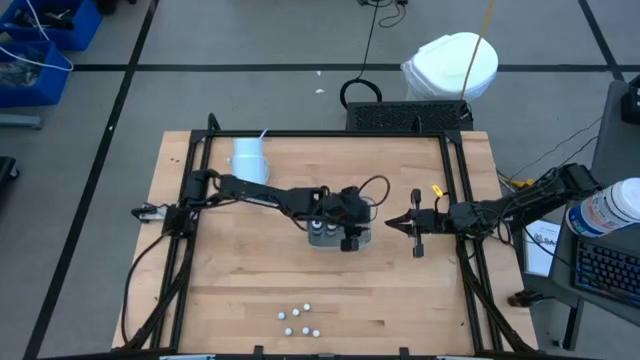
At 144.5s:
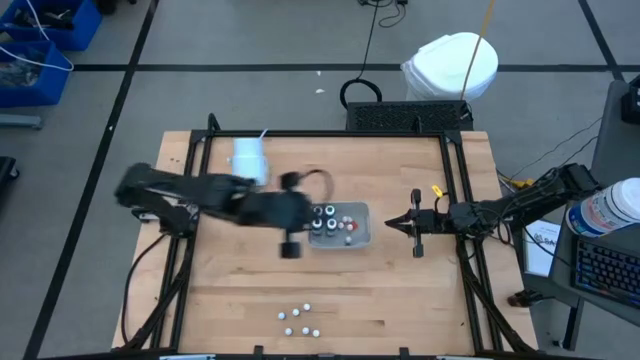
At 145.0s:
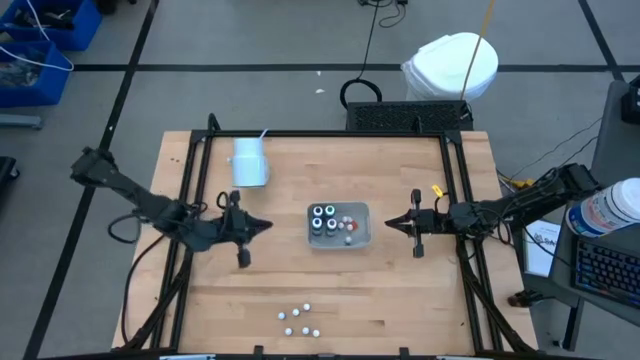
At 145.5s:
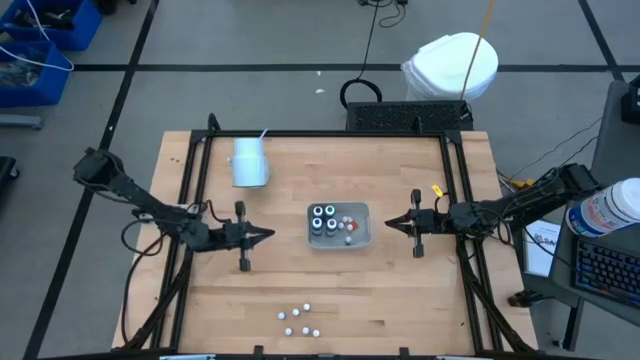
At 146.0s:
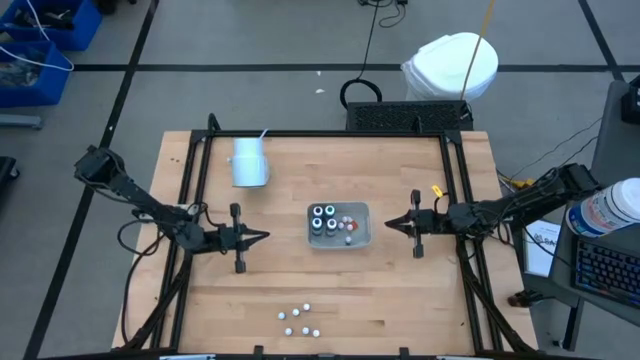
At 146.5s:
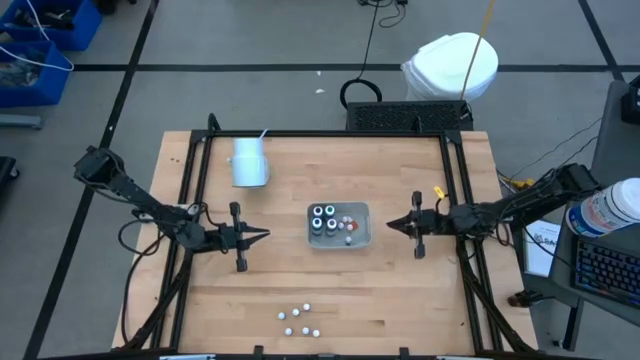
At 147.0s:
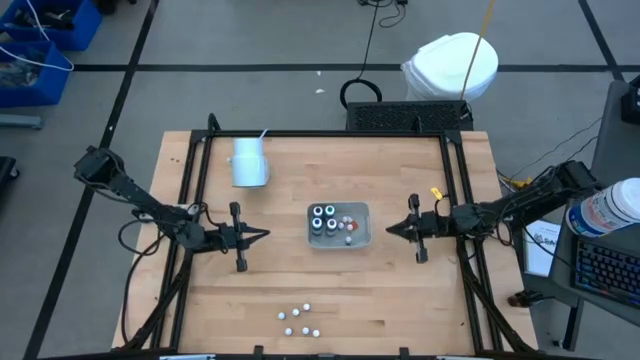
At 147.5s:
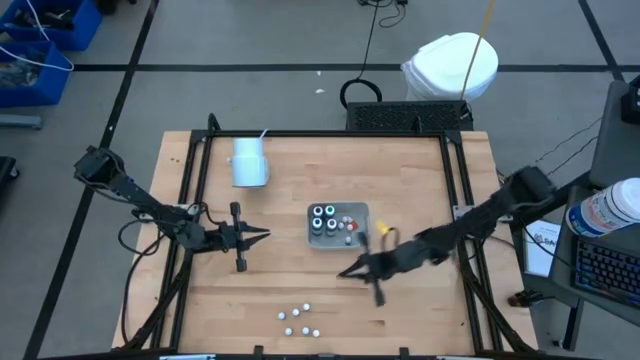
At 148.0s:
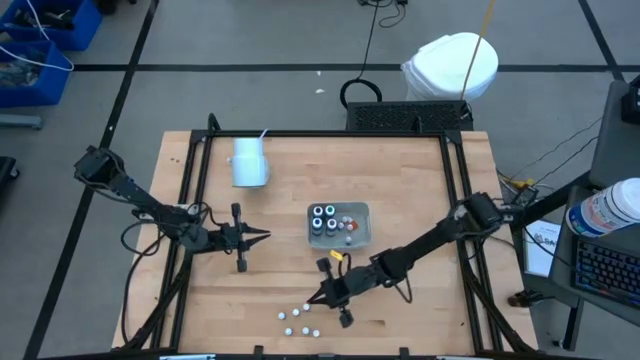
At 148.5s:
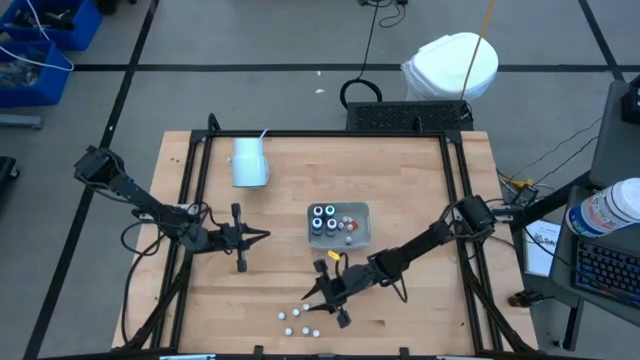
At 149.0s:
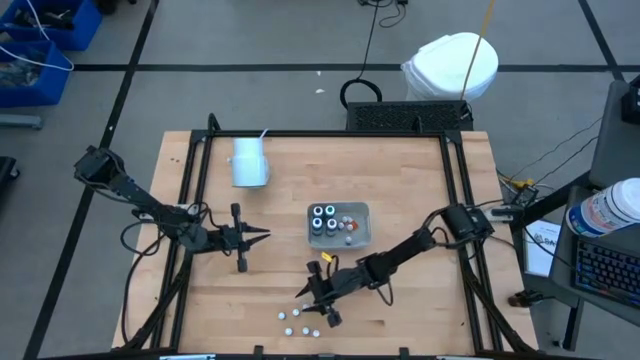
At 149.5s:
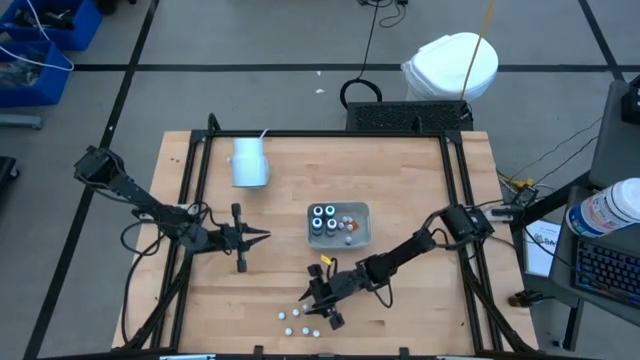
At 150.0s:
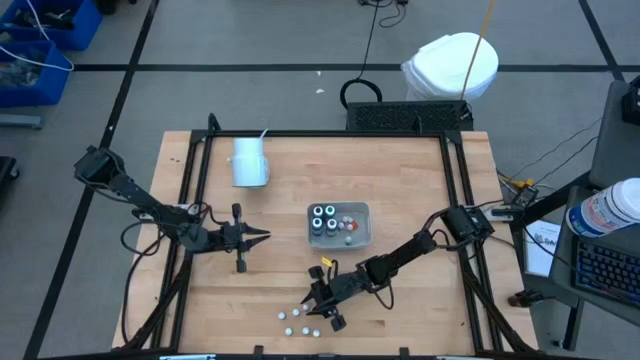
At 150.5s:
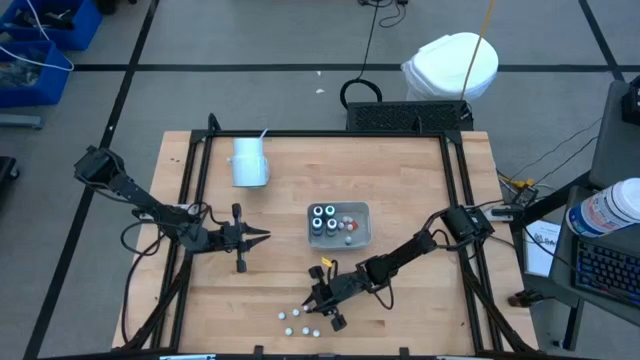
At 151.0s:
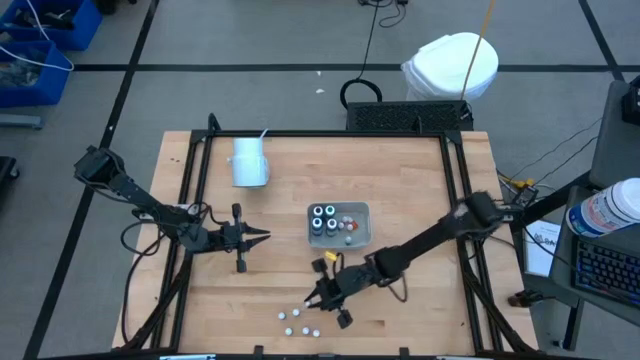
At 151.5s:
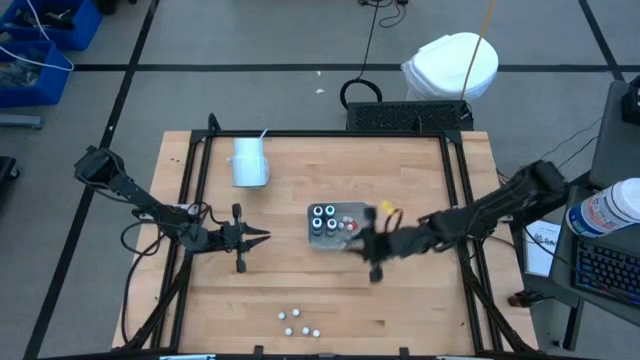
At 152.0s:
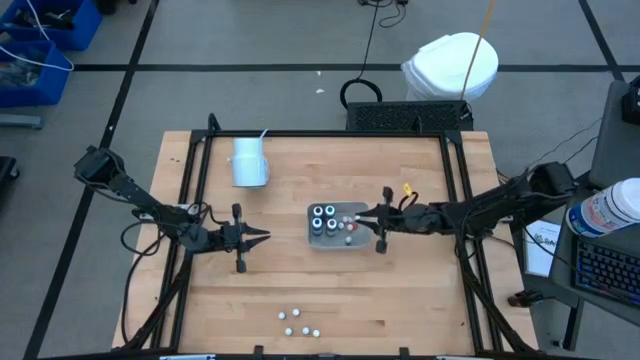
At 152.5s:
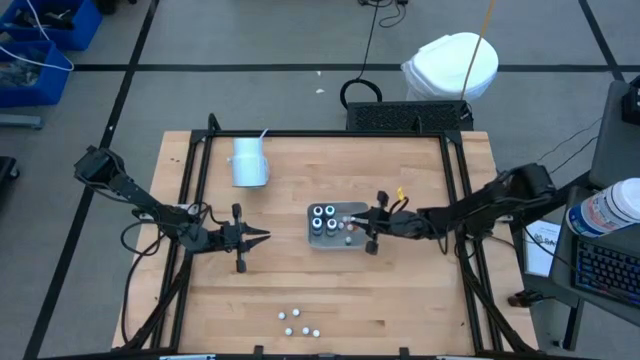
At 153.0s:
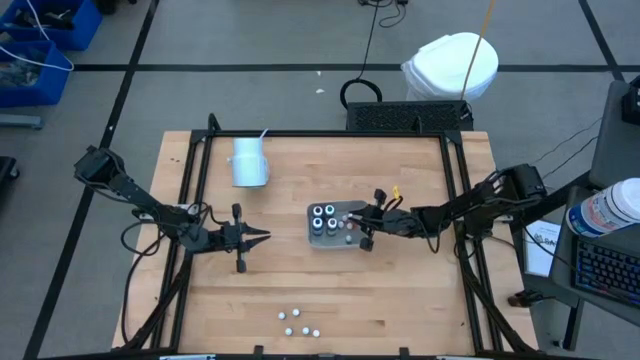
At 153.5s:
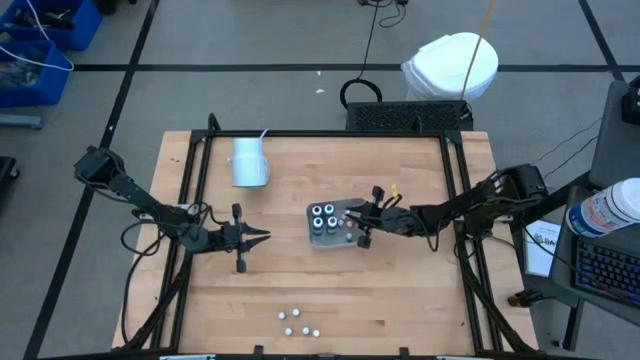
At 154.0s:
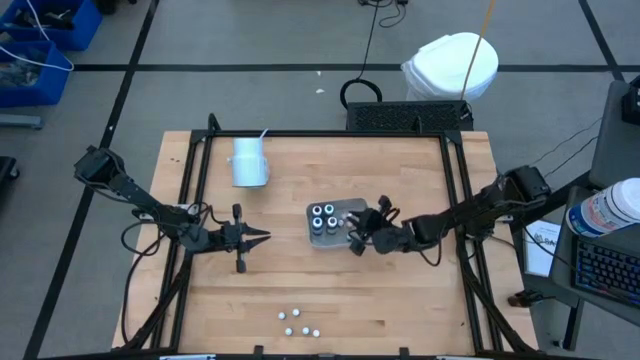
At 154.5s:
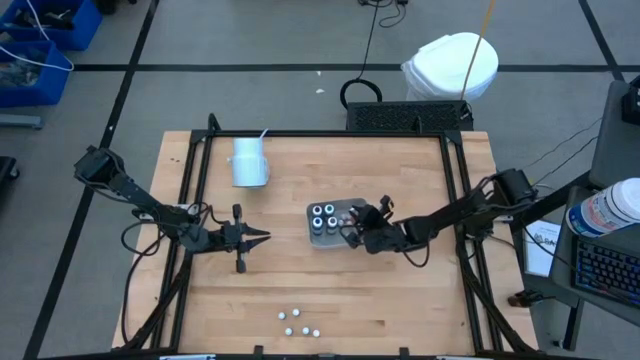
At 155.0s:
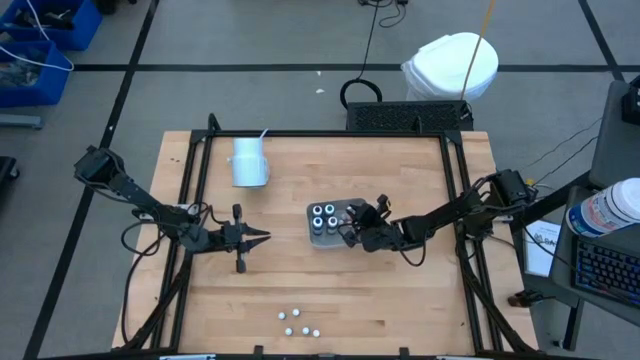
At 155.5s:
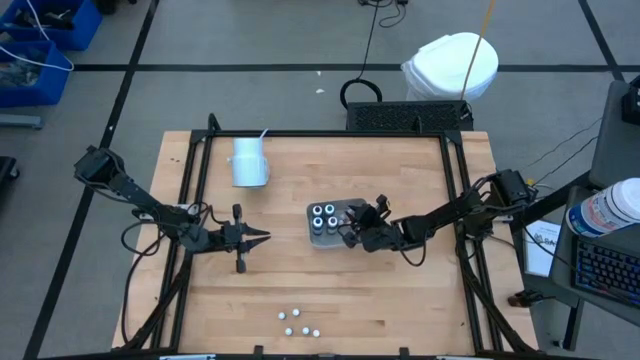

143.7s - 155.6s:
Task: Pick & Place food coloring
Put the small red food coloring bottle into the white container

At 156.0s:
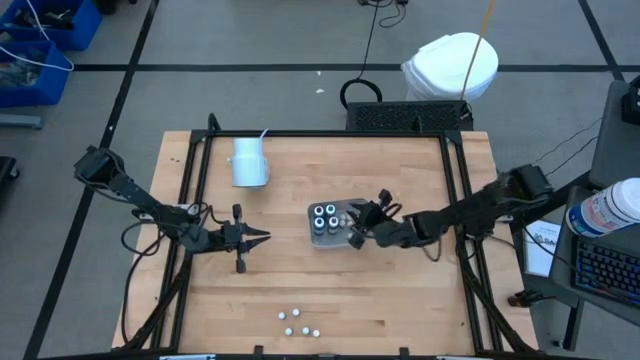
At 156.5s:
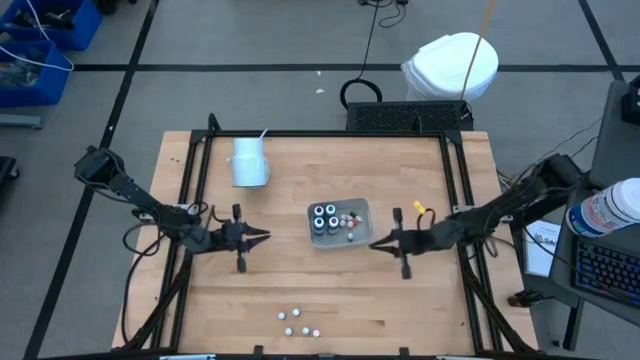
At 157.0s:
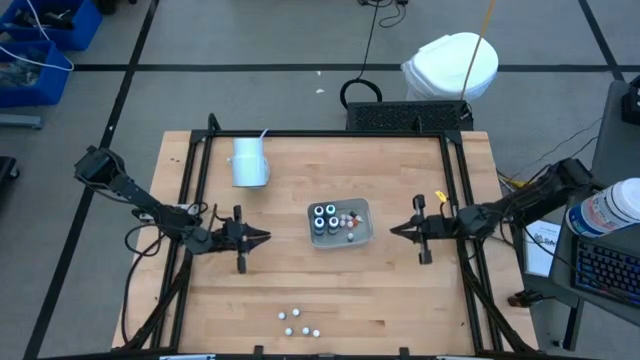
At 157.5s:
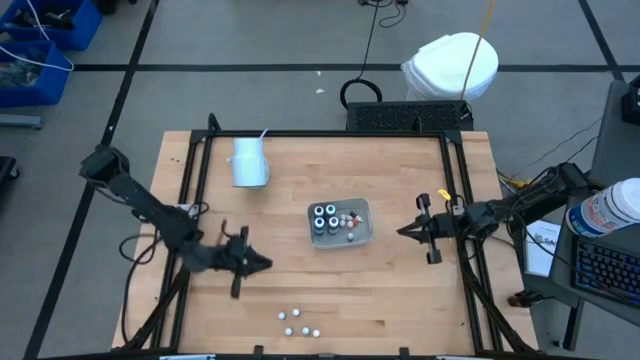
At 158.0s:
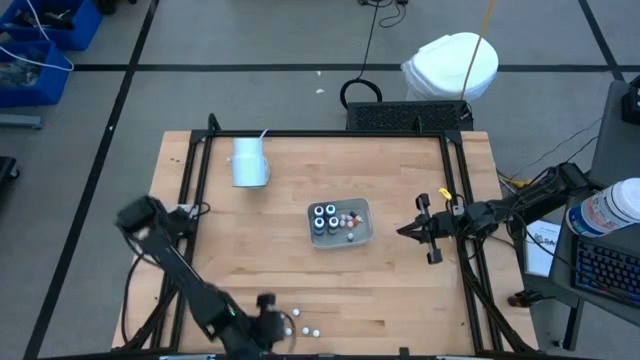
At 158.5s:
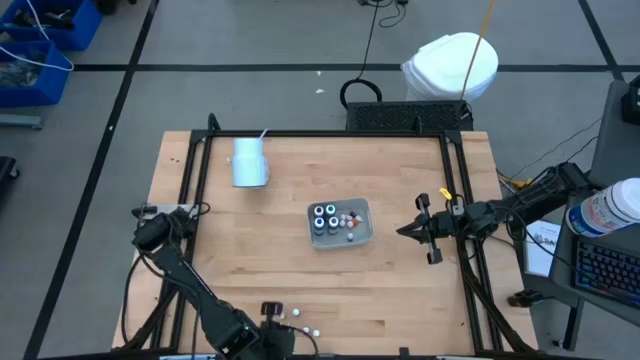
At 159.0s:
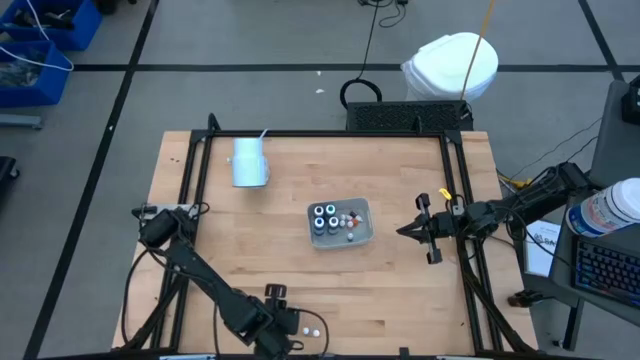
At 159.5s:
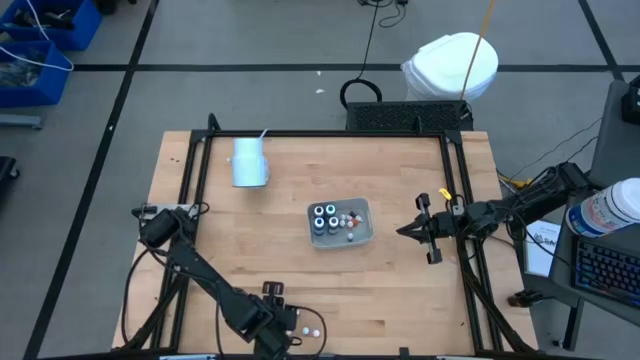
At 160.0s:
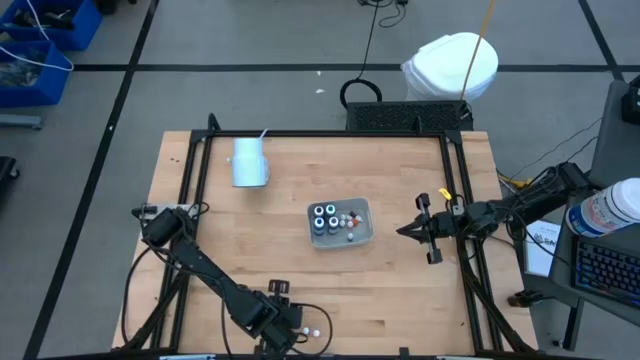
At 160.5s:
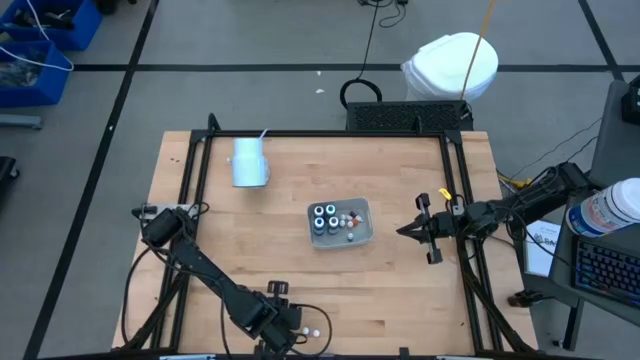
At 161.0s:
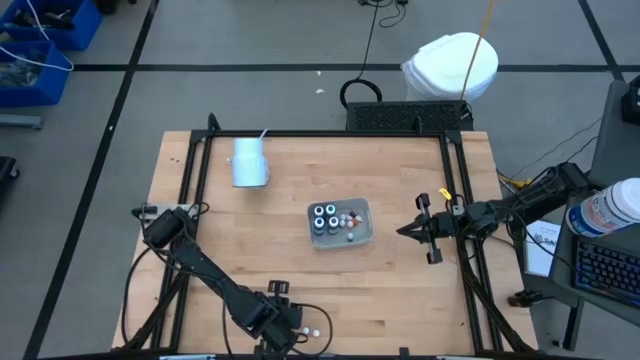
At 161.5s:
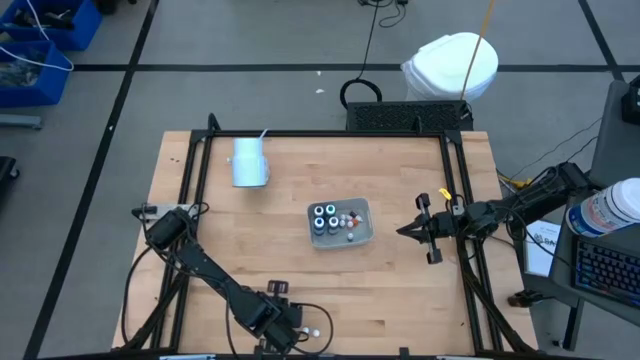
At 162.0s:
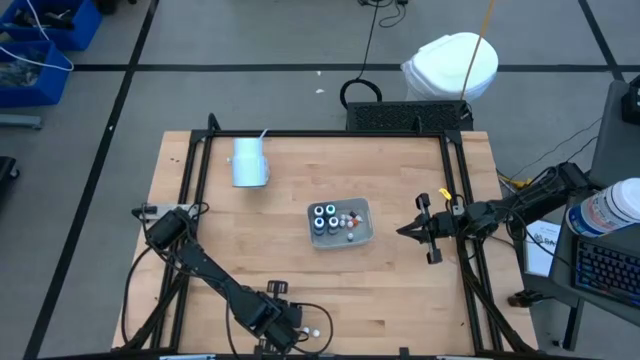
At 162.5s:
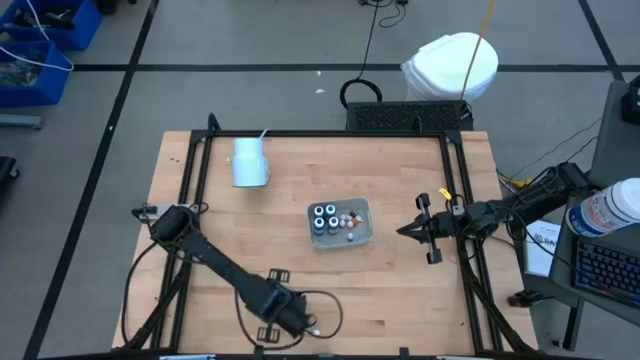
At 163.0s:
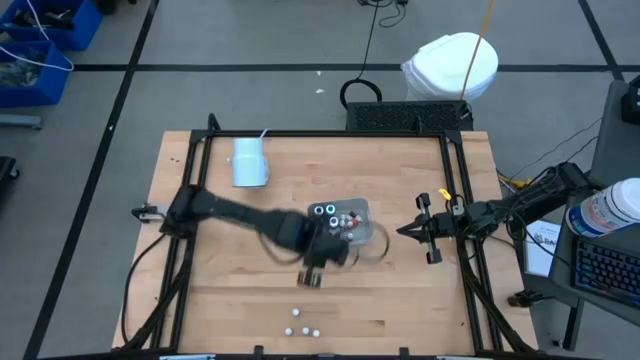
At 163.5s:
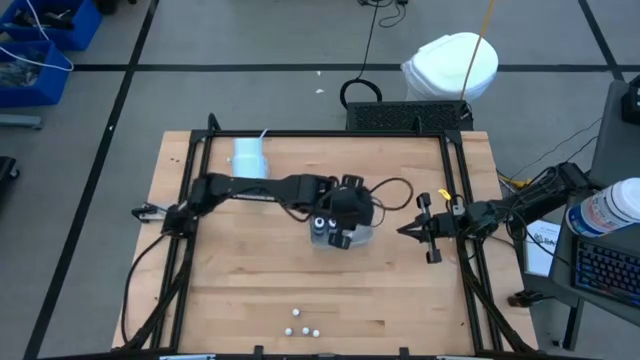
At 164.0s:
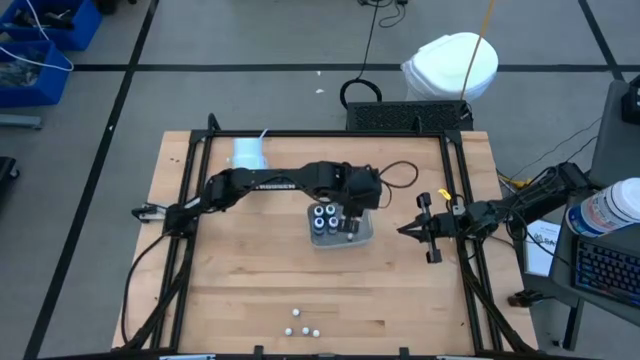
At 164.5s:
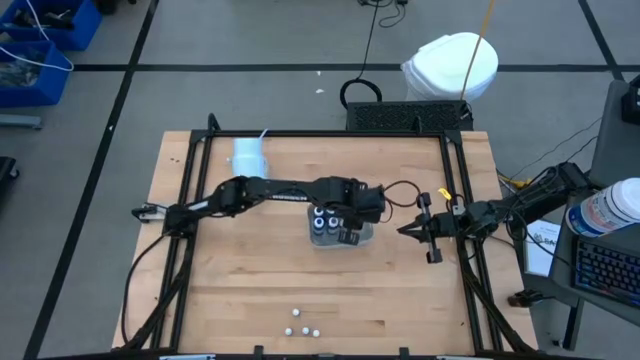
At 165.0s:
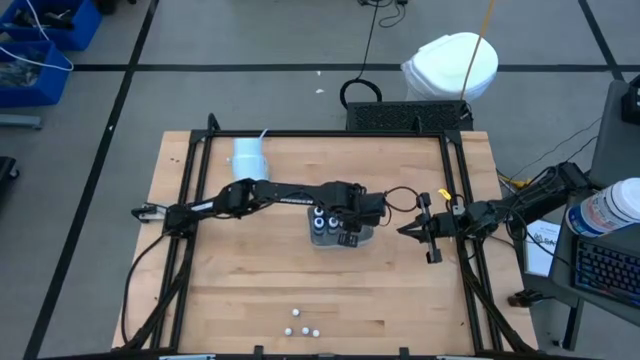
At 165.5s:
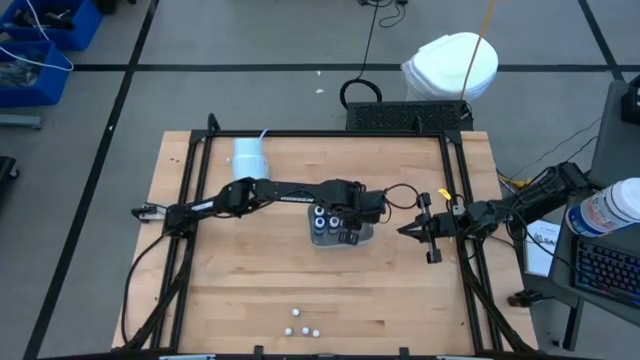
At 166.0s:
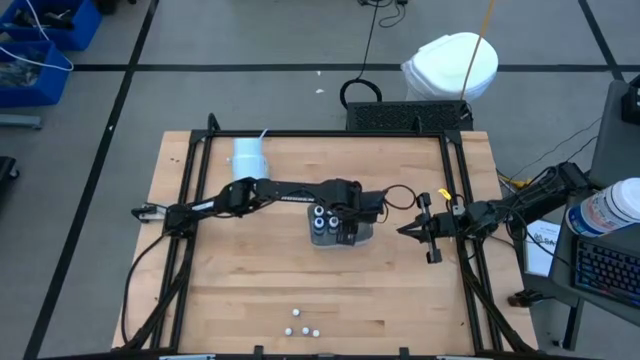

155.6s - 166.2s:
Put the small green food coloring bottle into the white container
